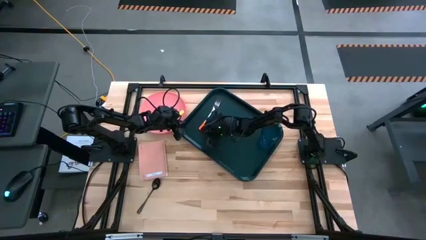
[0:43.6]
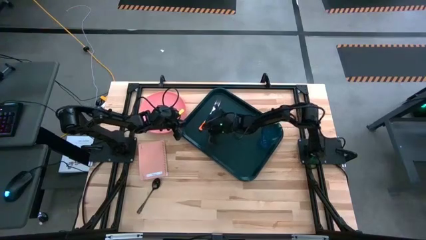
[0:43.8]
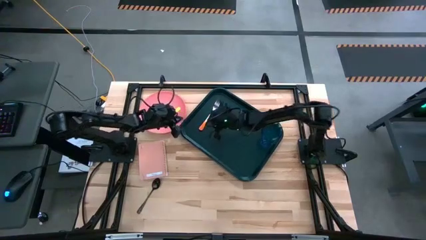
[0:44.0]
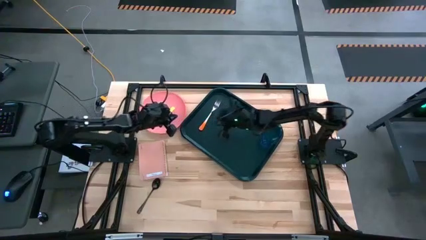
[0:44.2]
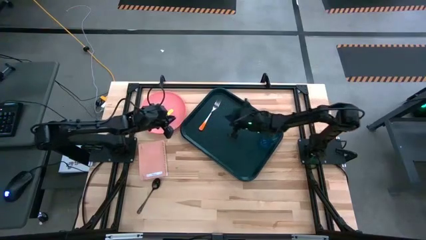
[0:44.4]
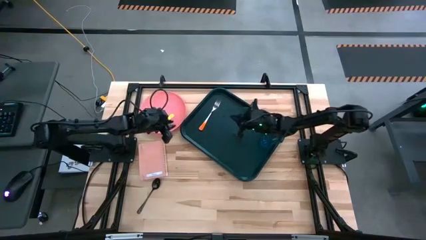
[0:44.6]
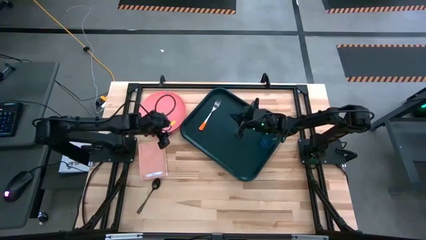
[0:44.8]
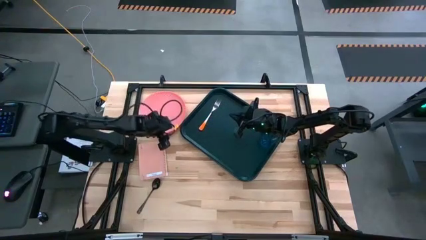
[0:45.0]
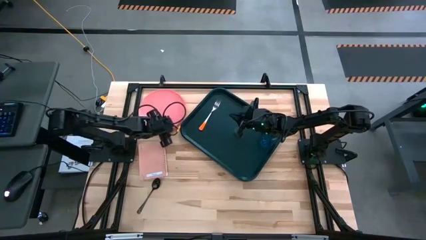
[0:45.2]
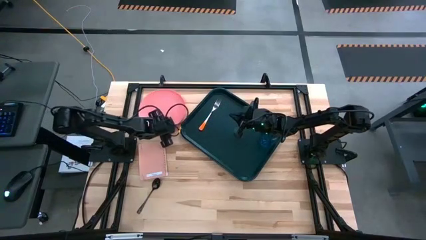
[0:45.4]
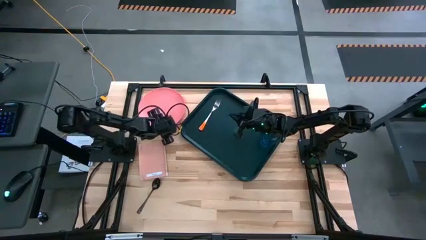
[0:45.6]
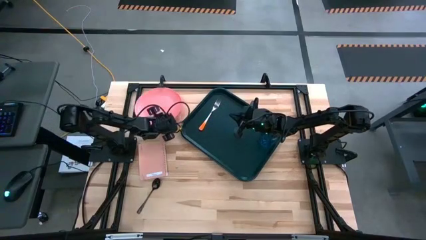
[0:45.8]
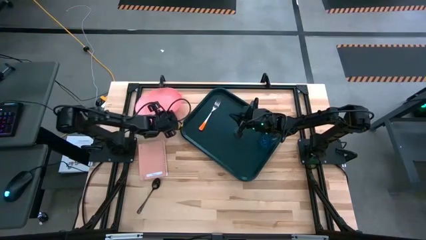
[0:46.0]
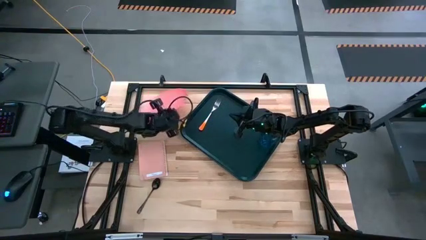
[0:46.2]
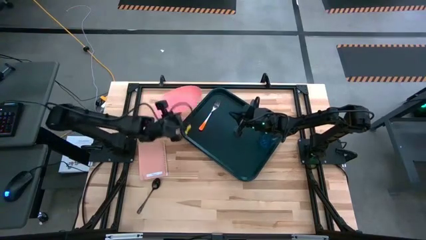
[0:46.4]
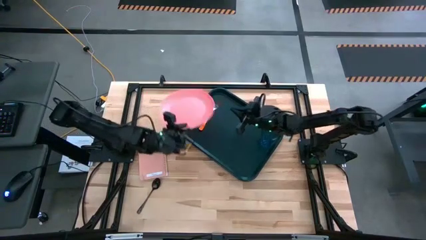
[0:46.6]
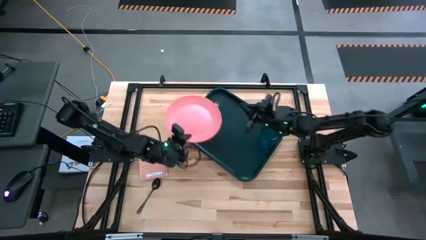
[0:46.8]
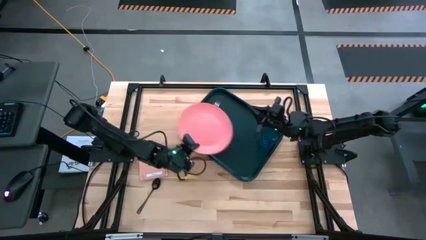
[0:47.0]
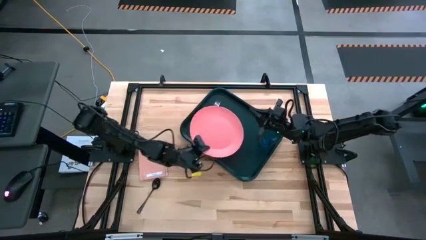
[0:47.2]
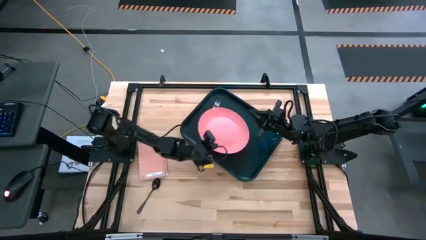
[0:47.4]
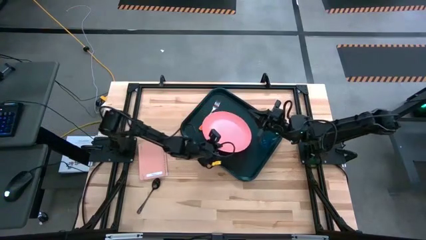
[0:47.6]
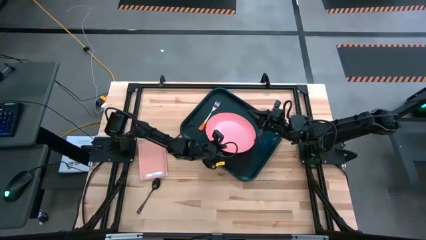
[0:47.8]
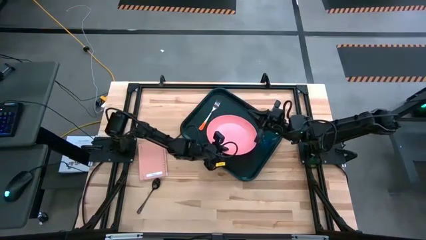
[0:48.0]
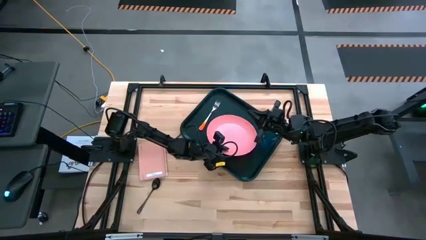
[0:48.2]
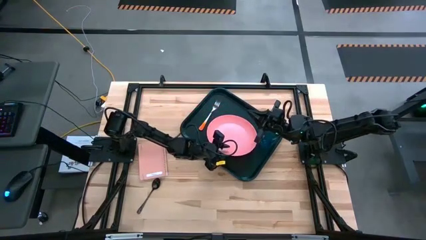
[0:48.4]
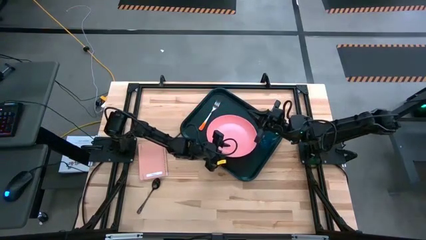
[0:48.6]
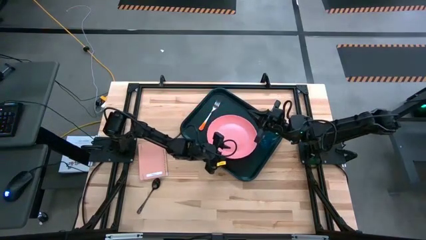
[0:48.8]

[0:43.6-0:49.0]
Task: Pick and place plate/cup/fork/spoon on tray
Put the pink plate on the black serving tray to the right of the orange fork

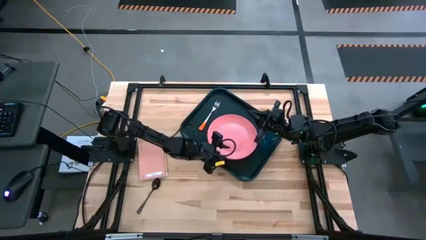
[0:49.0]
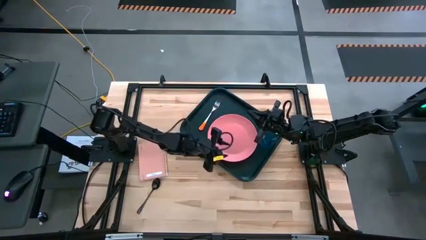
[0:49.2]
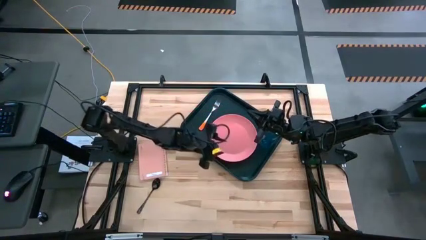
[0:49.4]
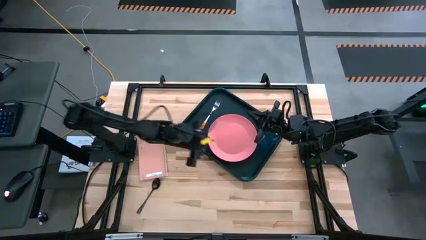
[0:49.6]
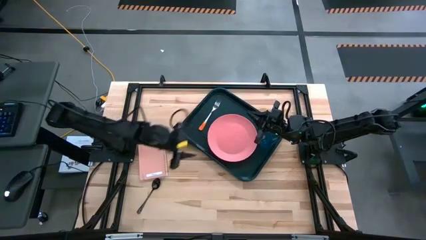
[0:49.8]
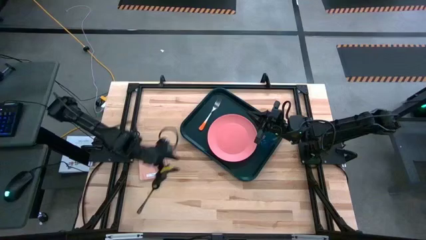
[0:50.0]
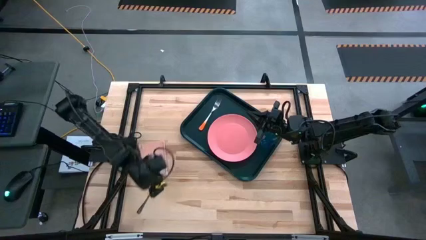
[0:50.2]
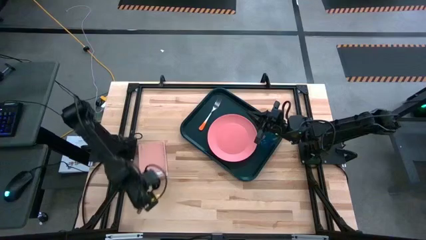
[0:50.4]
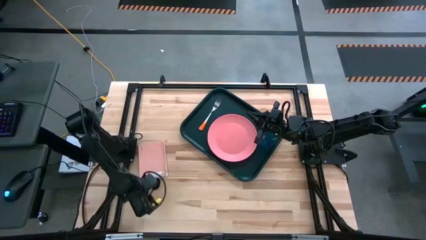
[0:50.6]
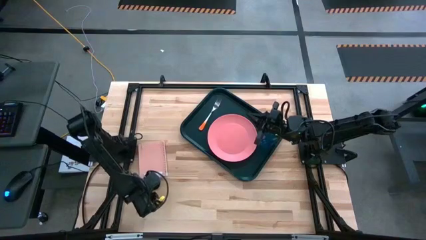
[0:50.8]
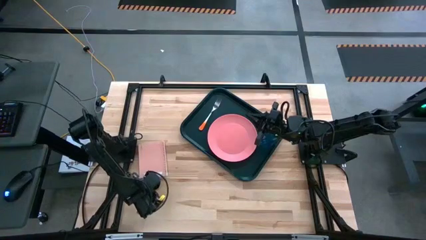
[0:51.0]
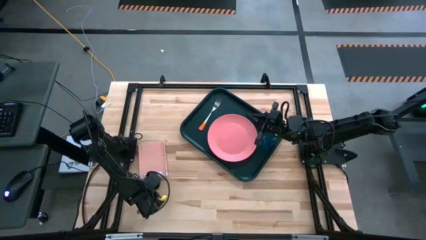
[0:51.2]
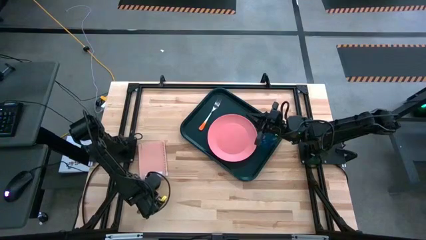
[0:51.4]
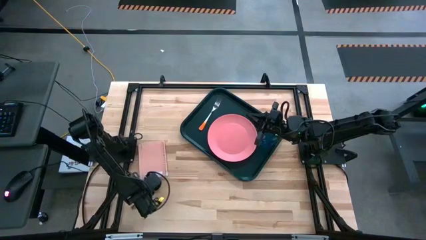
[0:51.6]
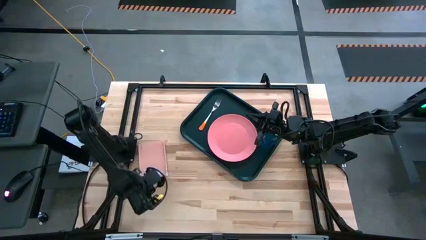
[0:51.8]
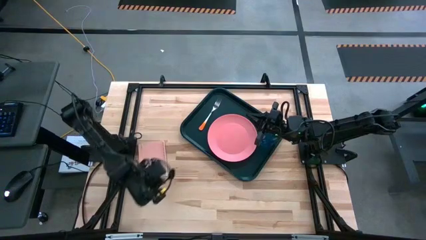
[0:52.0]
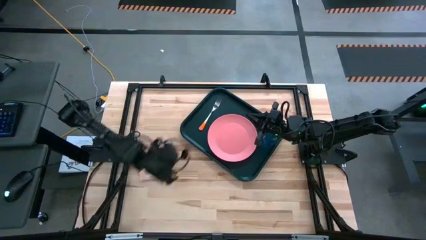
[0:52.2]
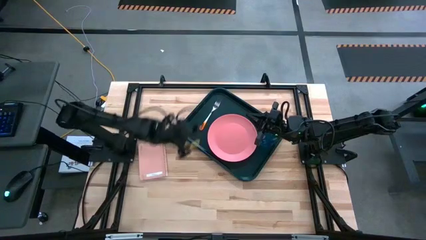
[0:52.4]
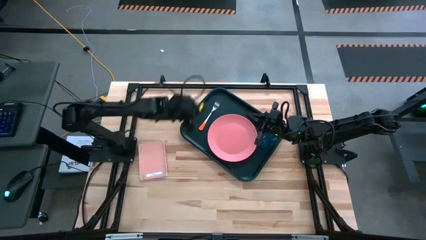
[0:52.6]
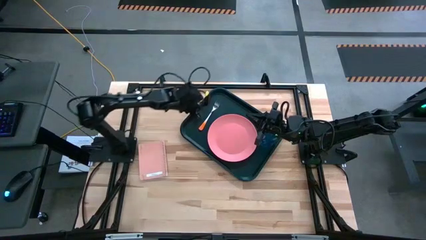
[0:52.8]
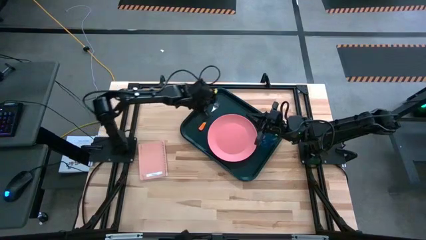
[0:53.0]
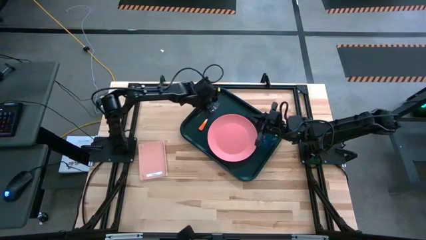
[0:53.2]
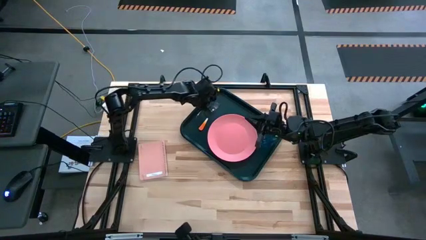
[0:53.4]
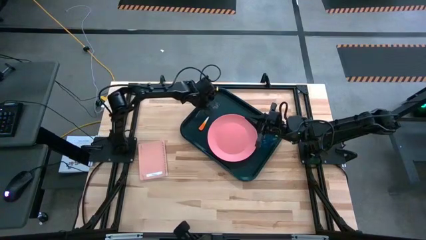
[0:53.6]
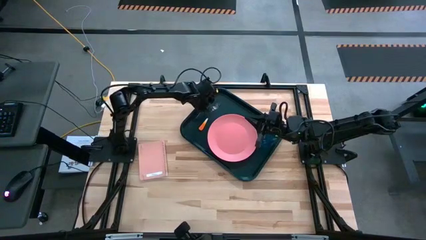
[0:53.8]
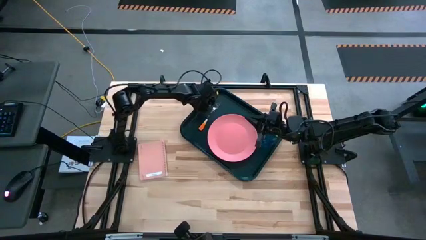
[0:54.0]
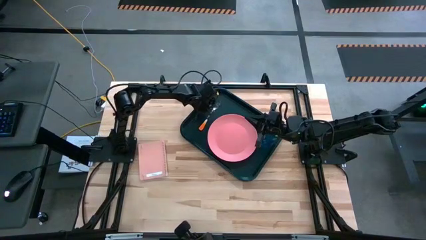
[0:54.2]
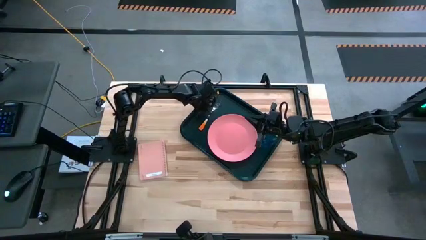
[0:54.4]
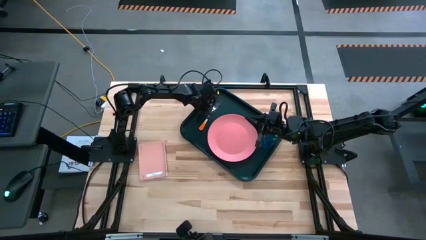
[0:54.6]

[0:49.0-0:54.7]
Put the black spoon on the black serving tray to the left of the orange fork

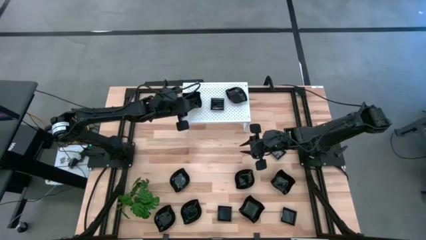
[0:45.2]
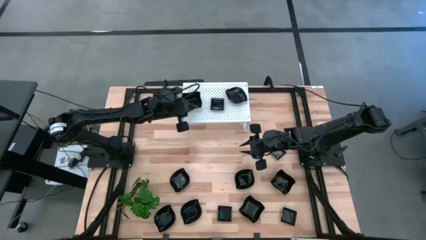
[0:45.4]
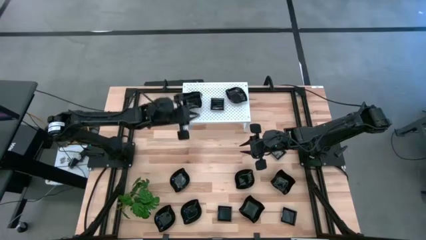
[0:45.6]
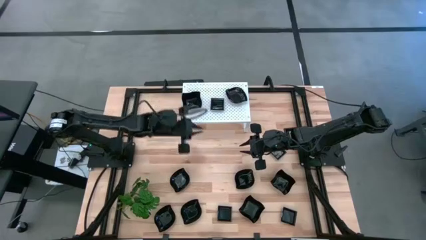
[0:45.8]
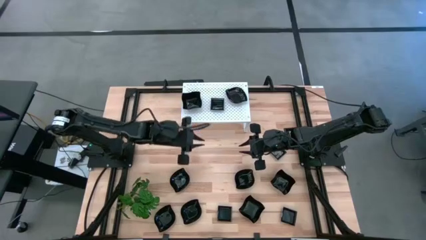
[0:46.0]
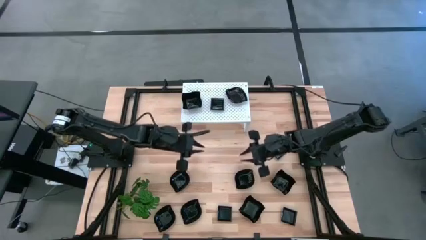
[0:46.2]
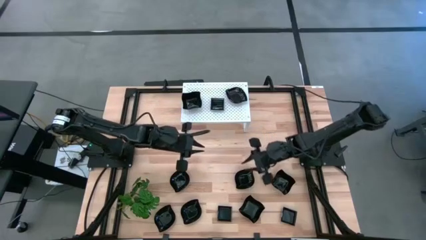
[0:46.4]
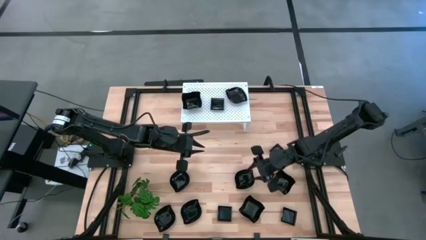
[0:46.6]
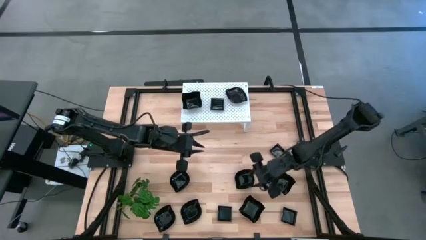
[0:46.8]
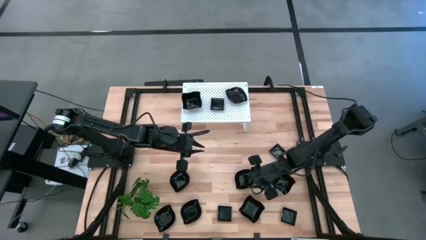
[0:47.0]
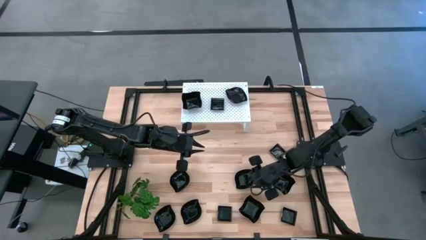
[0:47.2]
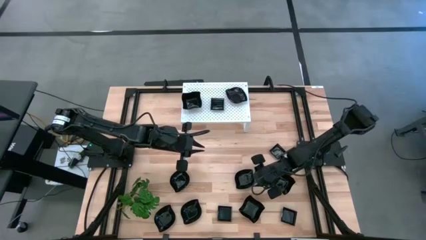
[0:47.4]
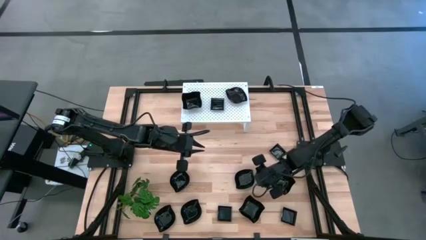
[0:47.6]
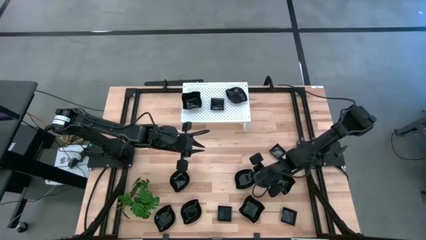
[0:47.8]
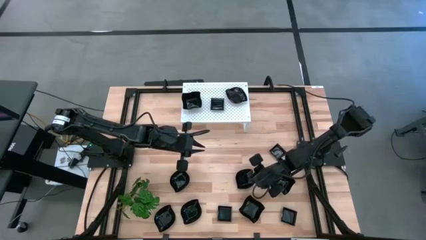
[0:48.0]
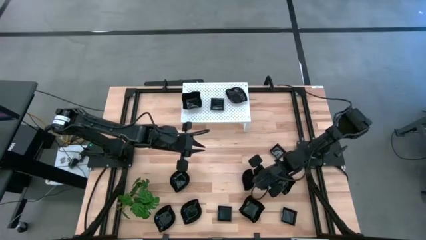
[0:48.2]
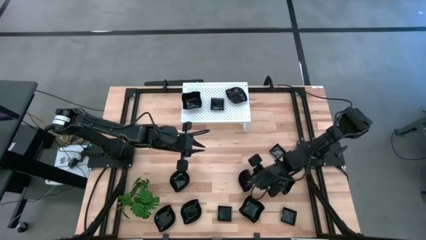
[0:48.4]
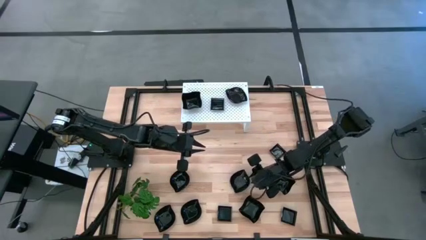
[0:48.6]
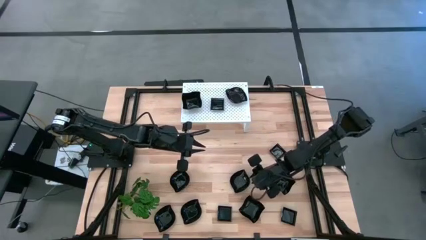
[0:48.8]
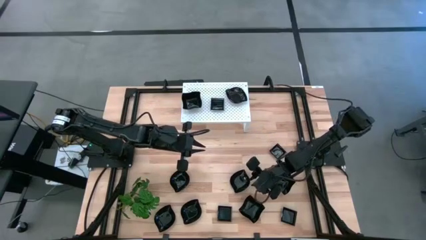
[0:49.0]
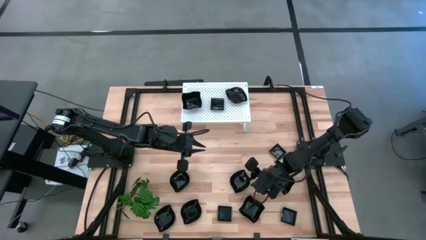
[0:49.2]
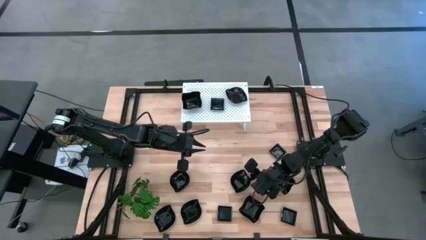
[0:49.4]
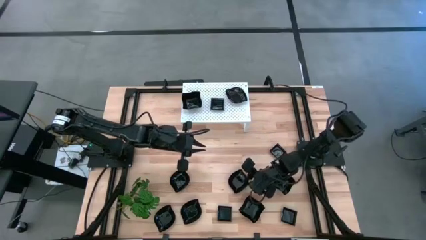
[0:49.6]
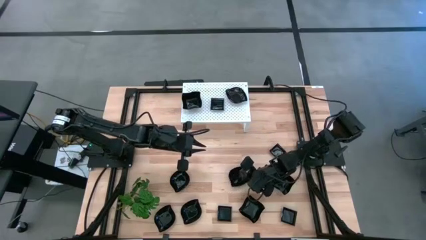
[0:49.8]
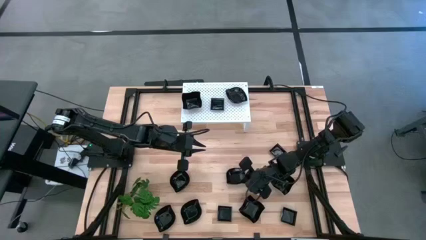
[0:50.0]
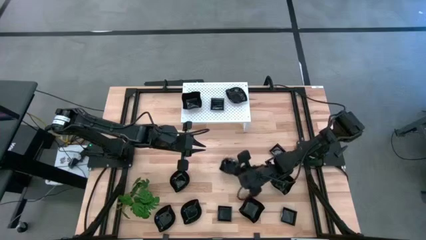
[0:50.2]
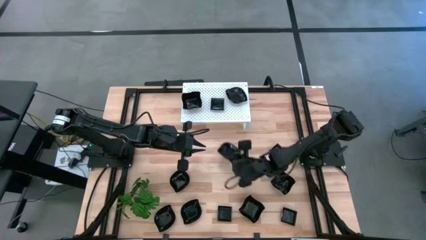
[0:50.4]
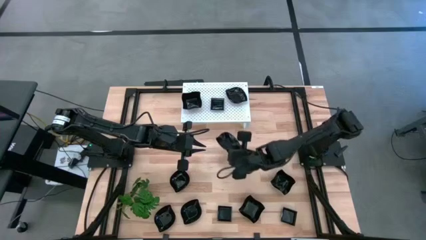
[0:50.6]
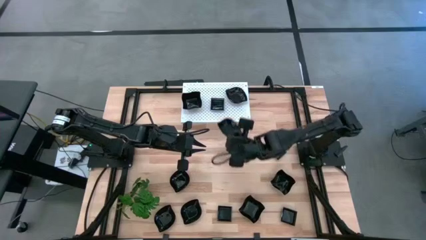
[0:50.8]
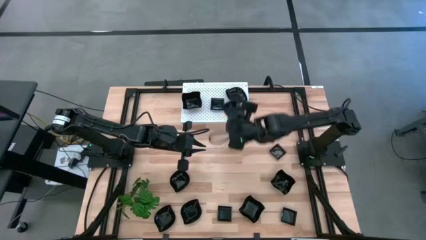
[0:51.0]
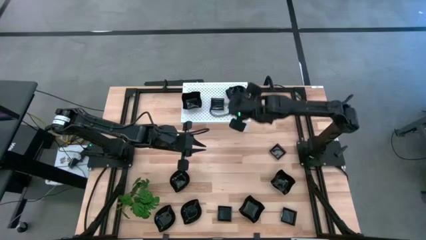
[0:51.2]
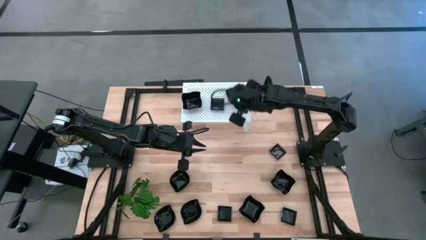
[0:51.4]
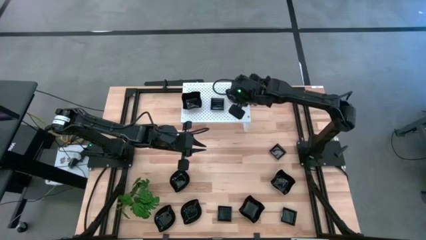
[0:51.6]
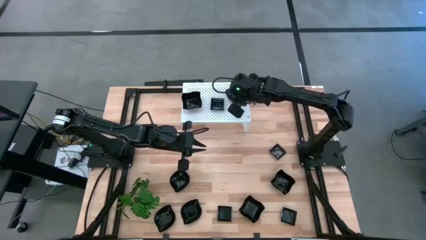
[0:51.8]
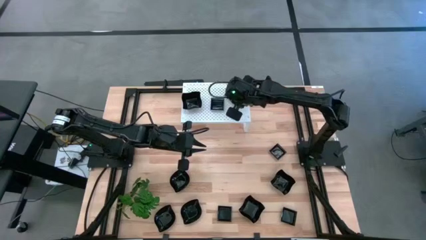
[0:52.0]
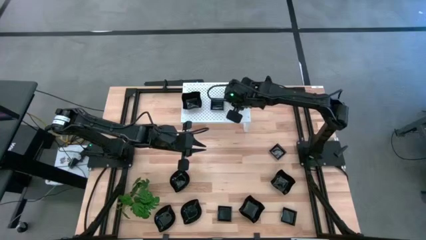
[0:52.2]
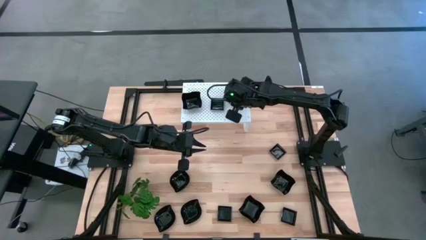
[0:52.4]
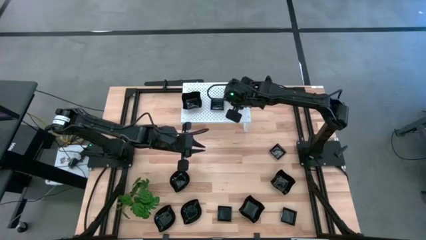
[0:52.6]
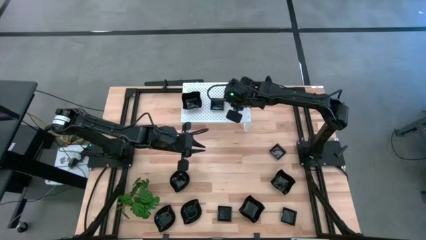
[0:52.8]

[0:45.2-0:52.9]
Task: Pick & Place Mini shaped plates
Stack the leaf shaped plate on top of the other leaf shaped plate on the shelf
